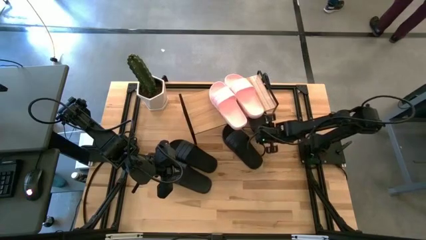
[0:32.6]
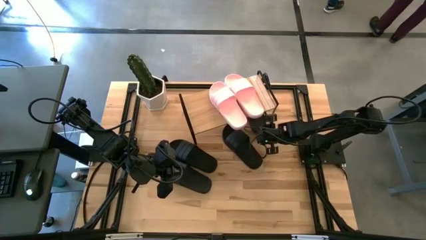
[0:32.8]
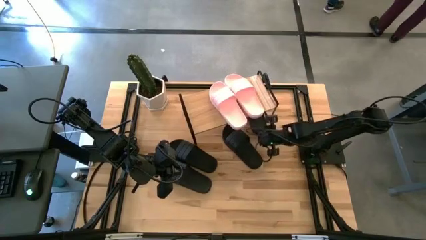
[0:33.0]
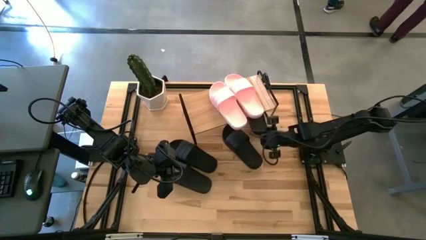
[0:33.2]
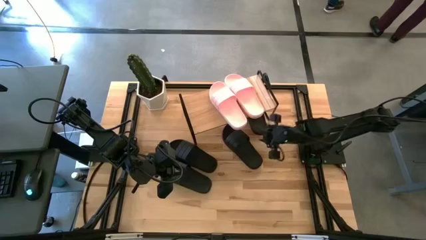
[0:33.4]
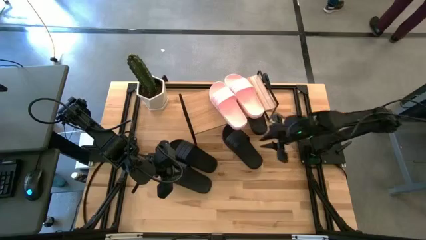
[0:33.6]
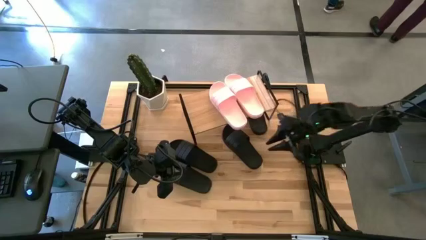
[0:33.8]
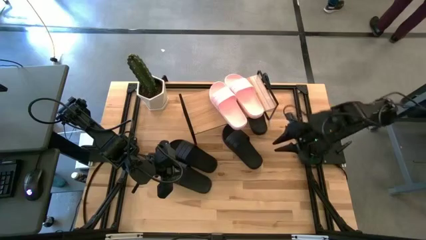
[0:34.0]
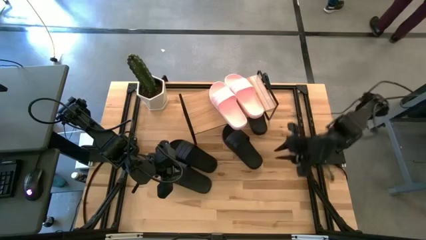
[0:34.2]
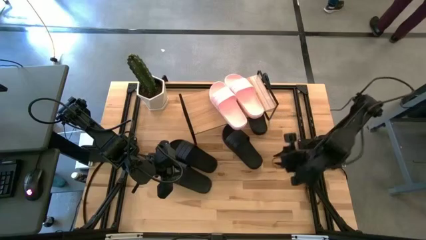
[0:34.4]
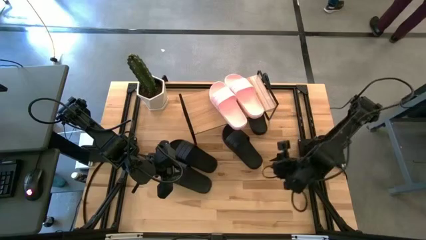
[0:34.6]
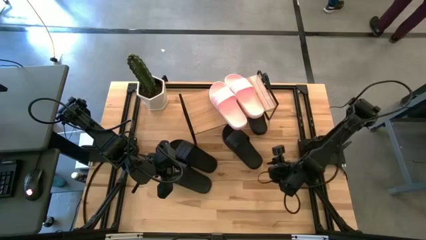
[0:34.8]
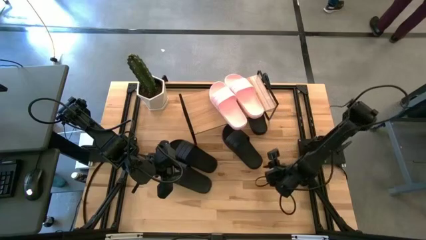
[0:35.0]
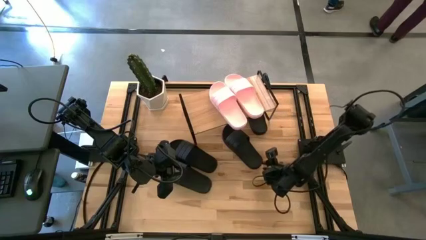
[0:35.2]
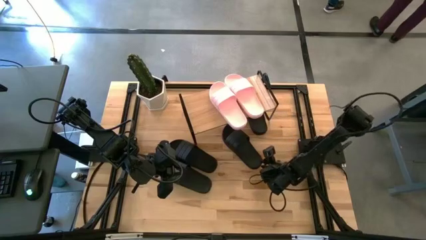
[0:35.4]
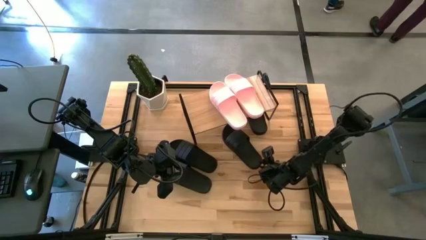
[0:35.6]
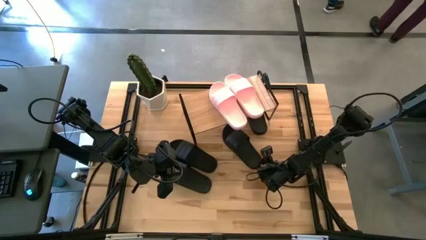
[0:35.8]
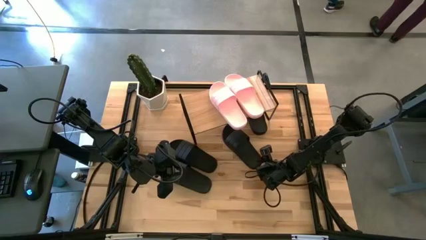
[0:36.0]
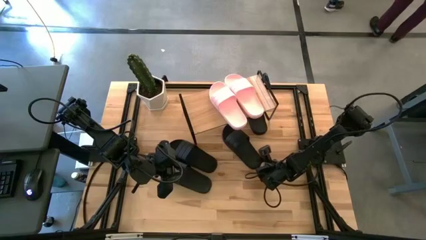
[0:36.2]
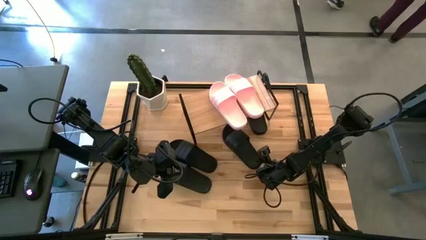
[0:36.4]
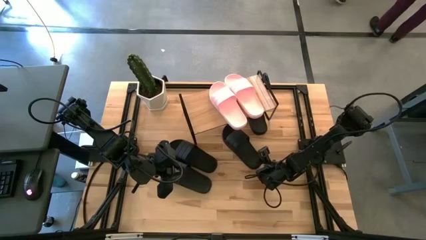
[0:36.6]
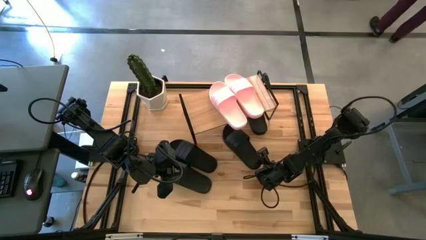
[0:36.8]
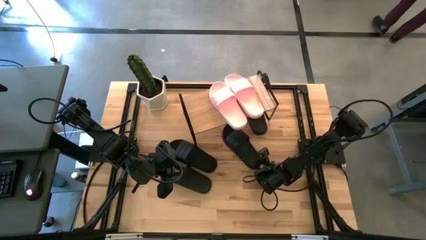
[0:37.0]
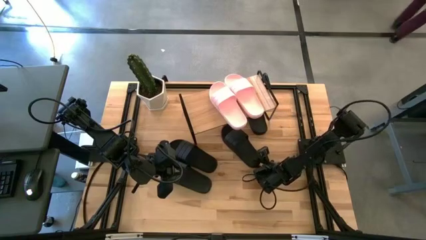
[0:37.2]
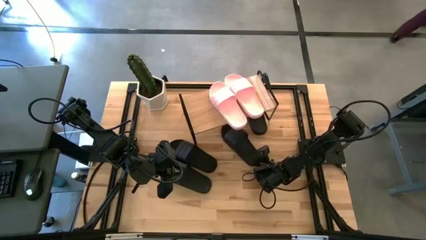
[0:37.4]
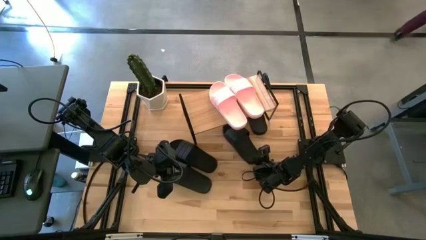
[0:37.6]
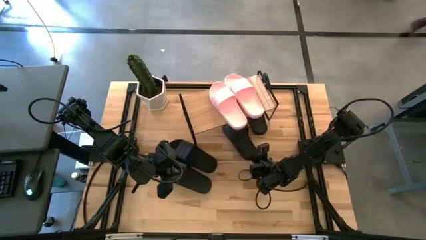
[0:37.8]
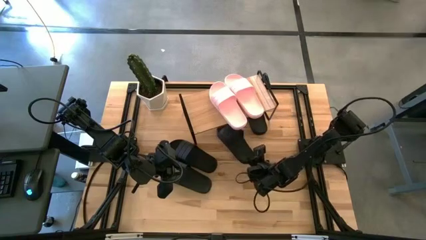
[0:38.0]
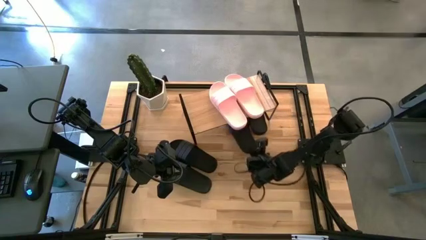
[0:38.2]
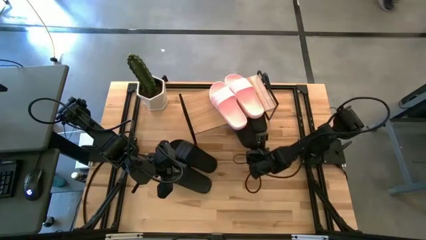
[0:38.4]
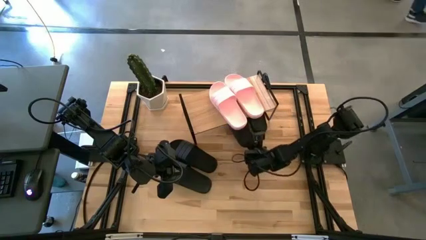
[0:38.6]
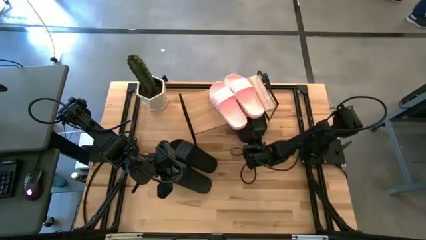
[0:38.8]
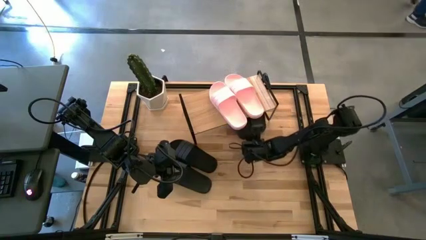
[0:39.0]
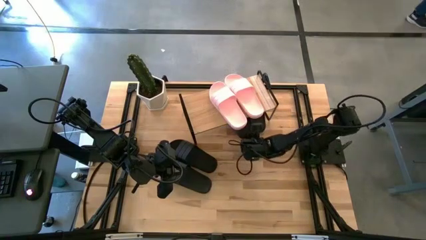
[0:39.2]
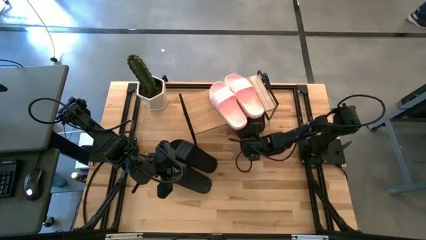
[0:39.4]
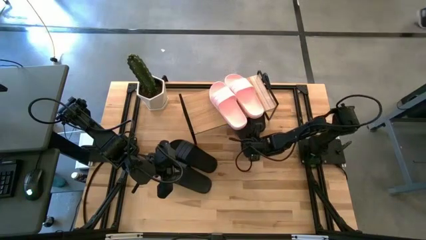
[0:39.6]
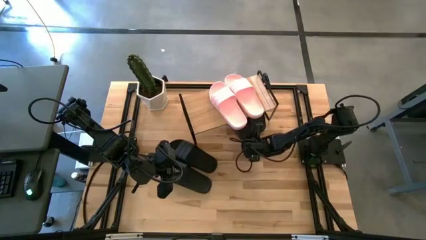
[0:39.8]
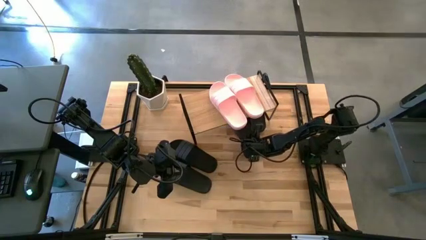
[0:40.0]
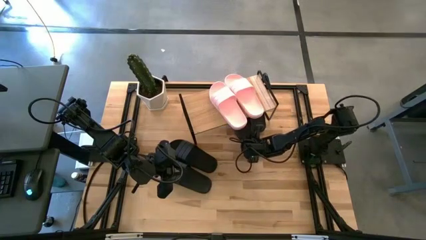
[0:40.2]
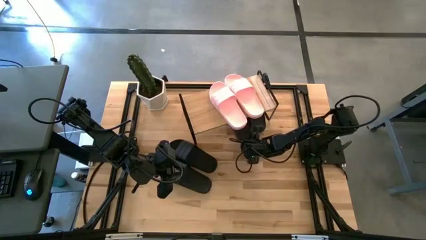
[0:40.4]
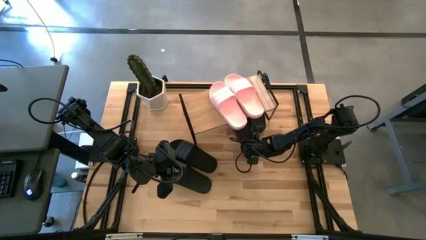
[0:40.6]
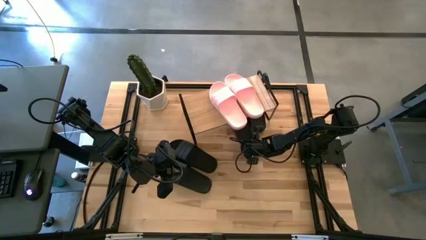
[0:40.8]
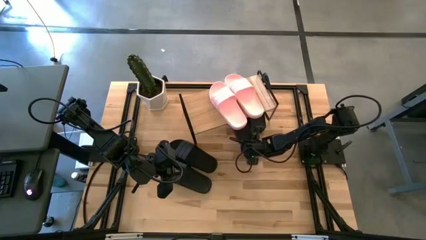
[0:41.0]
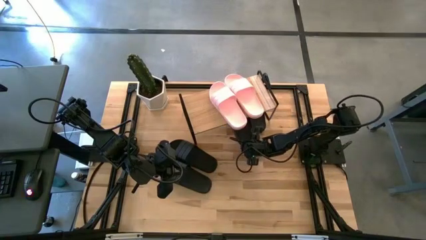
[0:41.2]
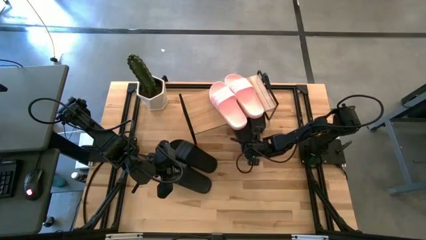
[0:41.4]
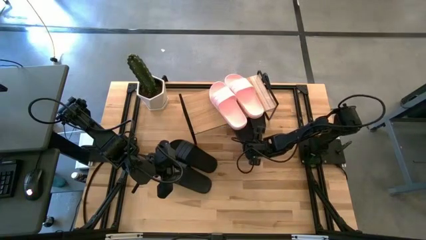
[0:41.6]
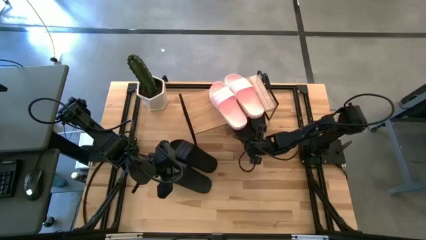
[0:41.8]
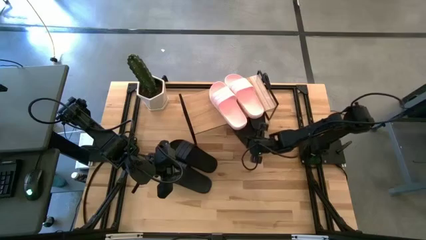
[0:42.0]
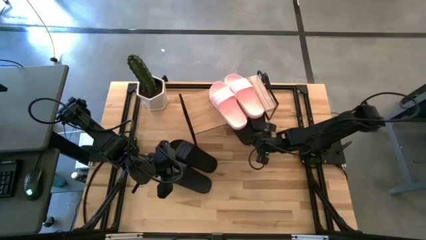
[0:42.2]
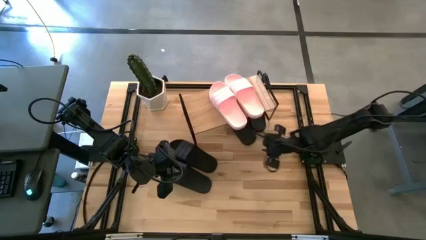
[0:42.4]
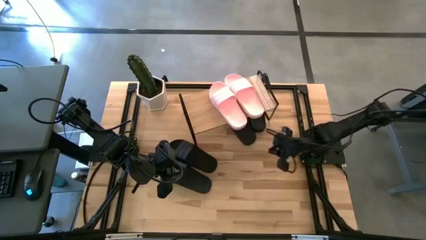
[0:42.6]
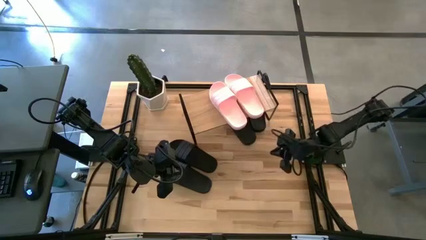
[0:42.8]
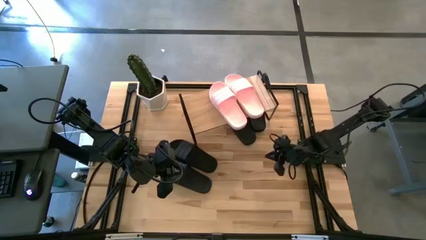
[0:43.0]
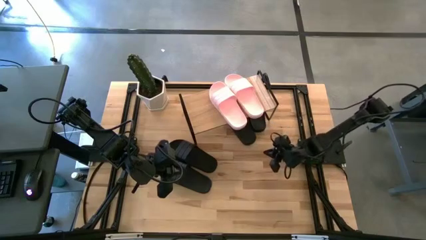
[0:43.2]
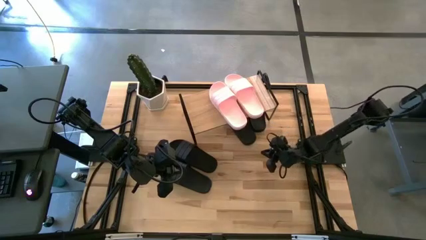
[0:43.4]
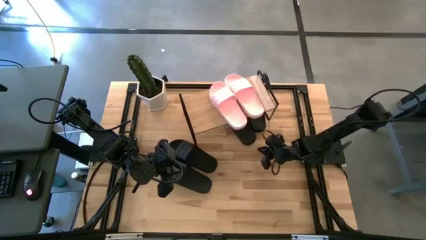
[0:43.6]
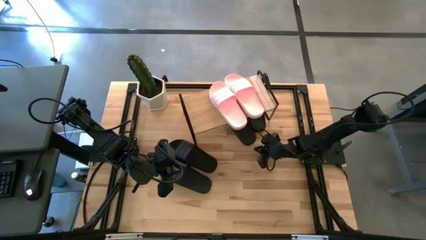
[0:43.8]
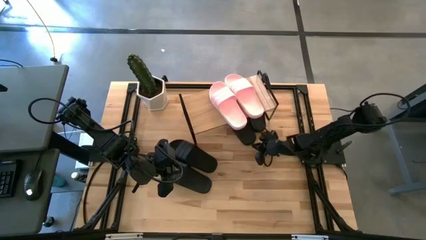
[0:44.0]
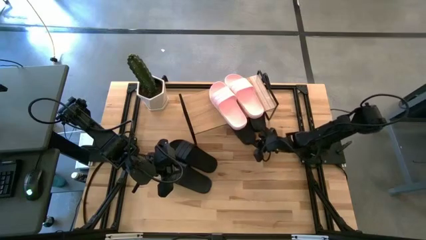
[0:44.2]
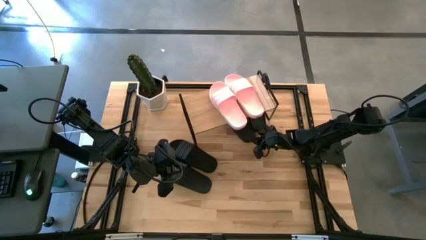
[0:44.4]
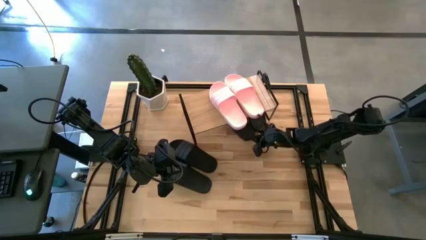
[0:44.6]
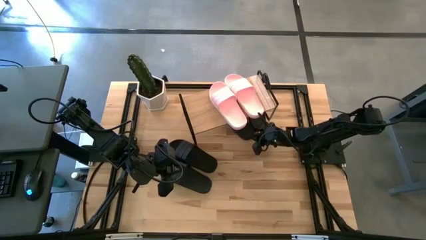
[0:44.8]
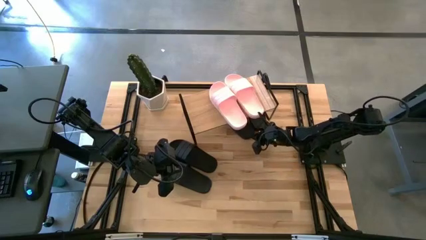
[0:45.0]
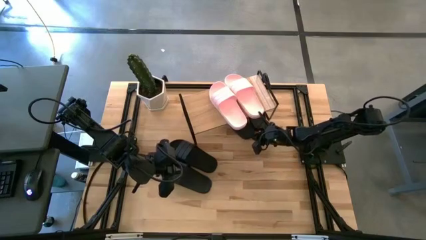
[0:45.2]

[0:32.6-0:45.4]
Task: Pick and place slides into the shelf
Put the black slide under the shelf

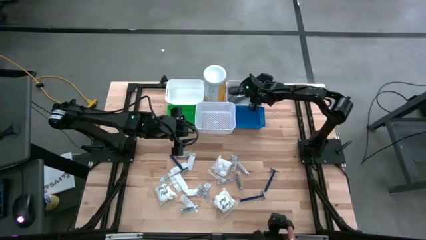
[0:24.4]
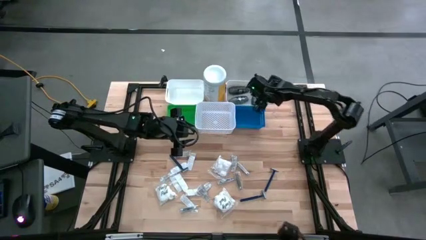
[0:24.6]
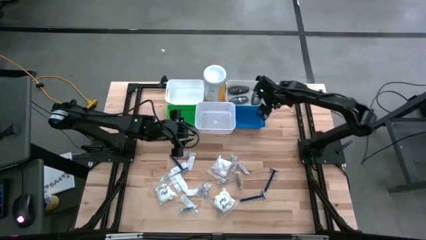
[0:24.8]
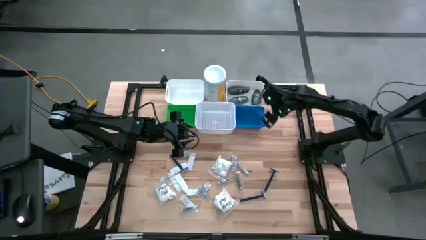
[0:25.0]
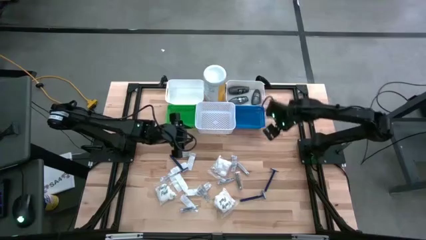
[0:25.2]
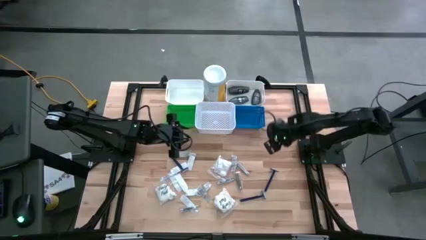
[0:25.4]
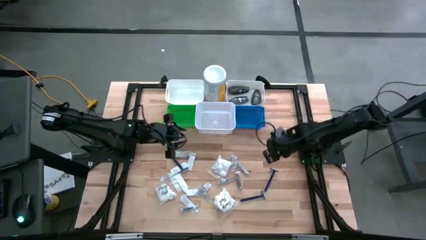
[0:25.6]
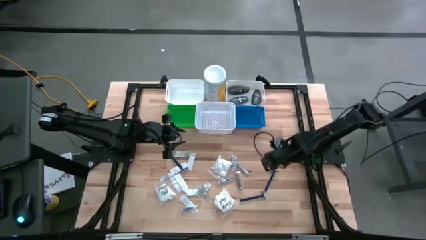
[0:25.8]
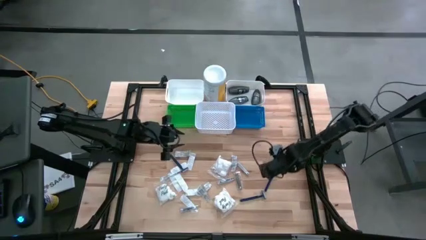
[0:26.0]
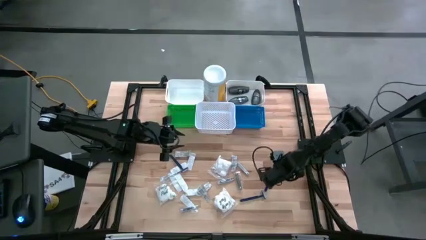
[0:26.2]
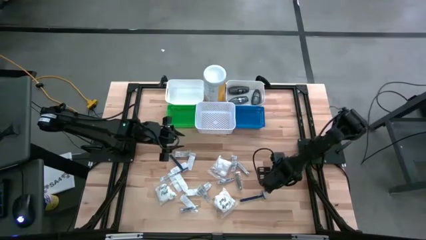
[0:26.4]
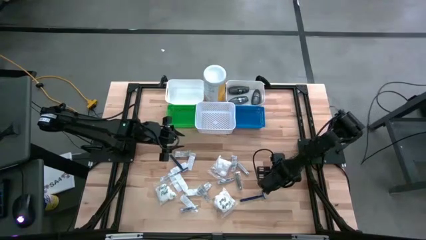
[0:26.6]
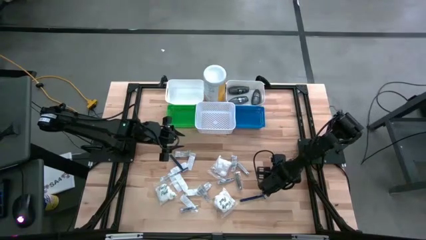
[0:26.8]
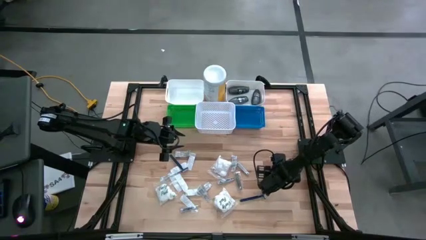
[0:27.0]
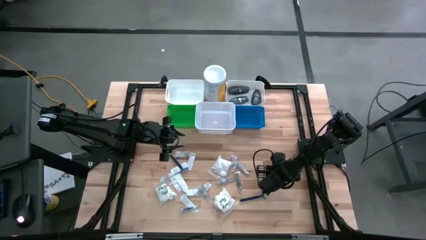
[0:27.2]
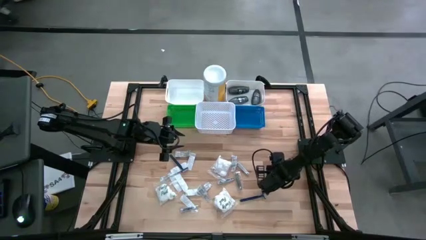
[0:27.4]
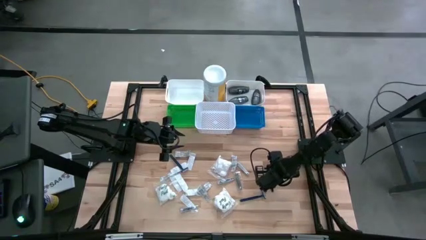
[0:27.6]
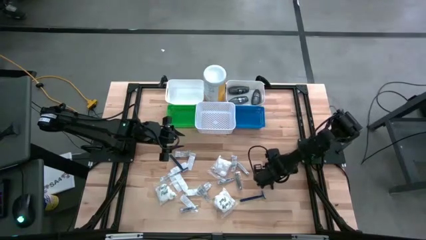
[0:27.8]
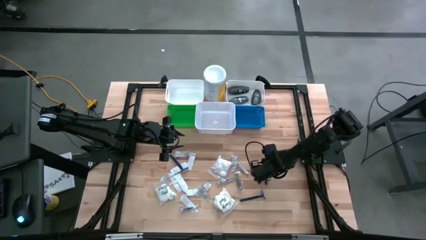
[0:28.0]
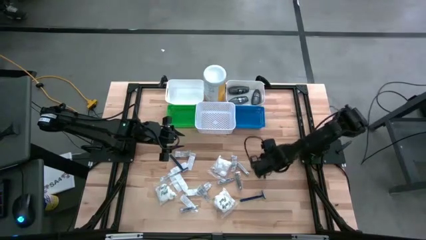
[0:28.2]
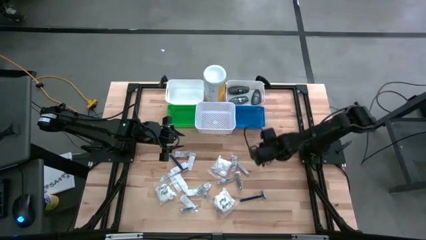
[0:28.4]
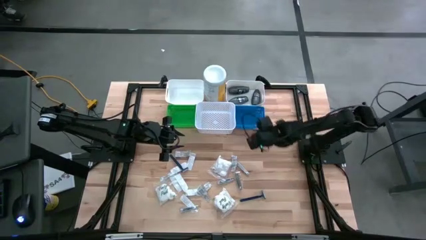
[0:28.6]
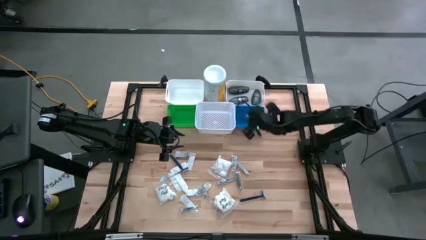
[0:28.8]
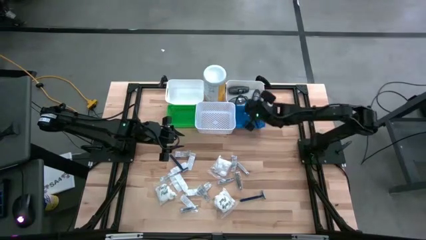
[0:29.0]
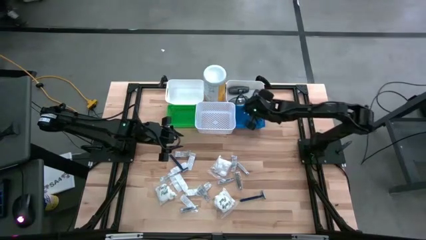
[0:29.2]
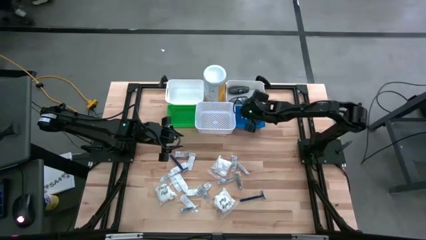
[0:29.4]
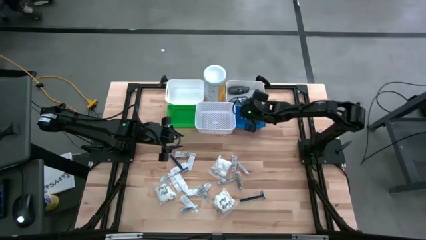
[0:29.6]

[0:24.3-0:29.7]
Task: Pick & Place Travel size toiletries
Put the blue razor into the blue bin
